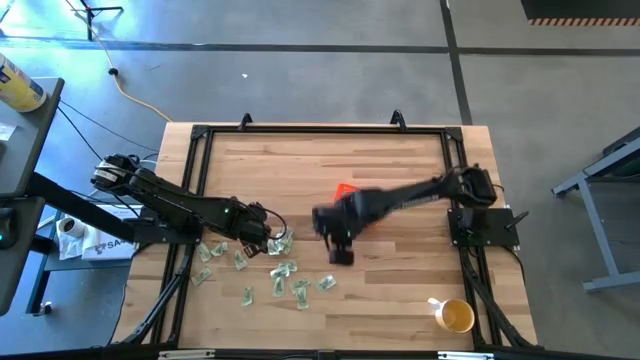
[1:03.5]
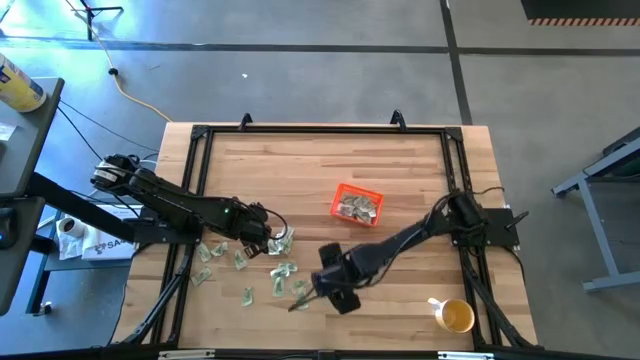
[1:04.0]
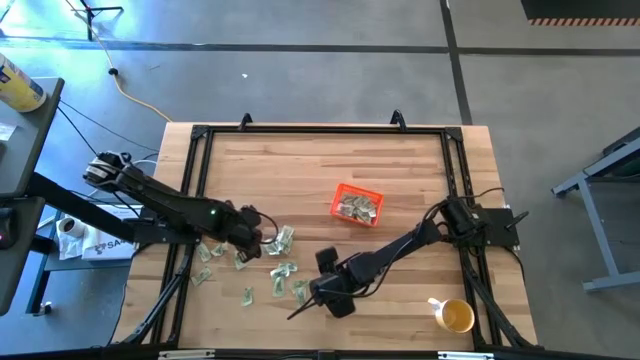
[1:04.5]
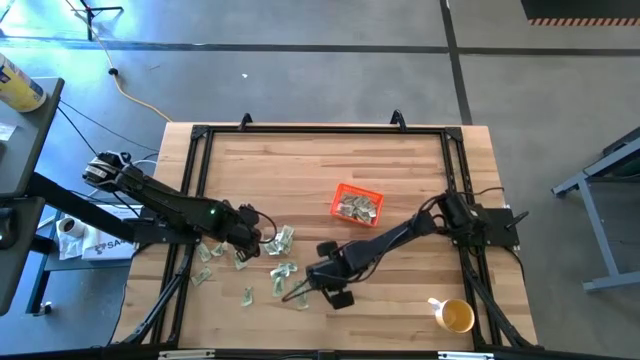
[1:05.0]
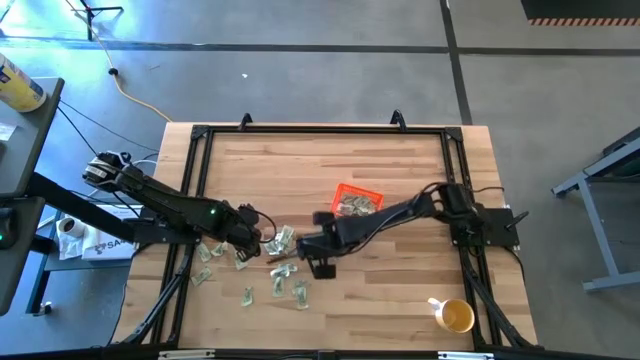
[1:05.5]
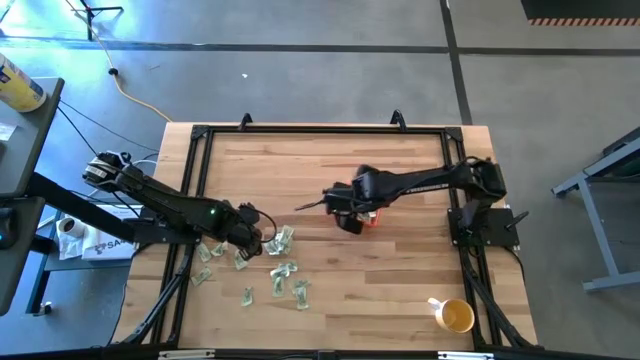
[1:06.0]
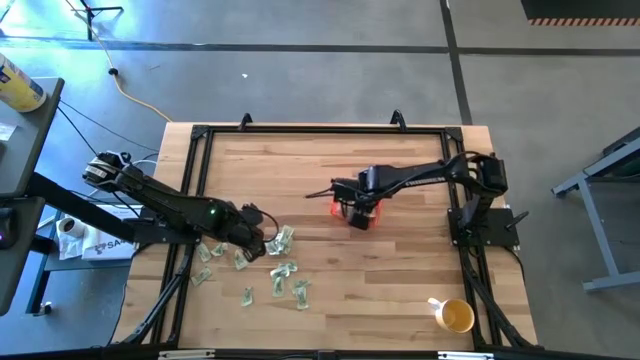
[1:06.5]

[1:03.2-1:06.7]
Task: Pick and place Stevia / Truvia into bins
Put the green stevia packet into the orange basket

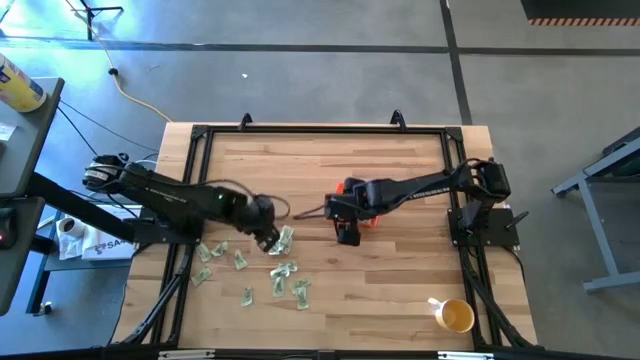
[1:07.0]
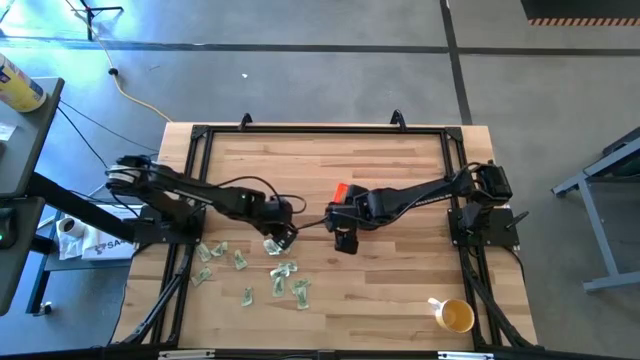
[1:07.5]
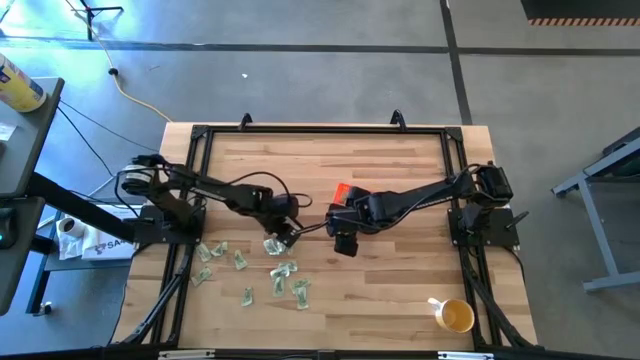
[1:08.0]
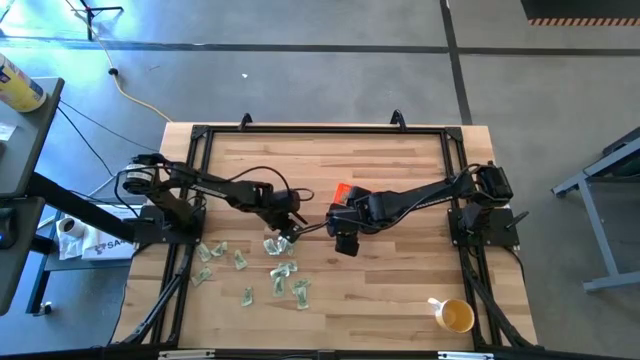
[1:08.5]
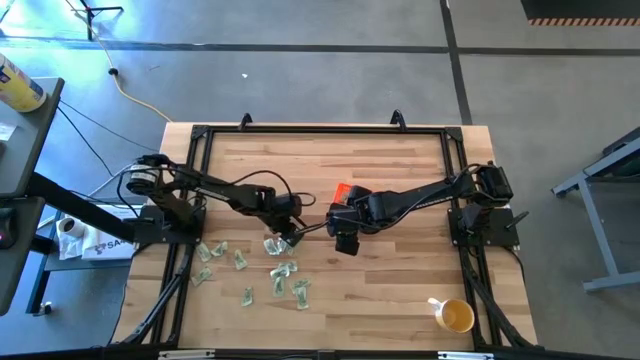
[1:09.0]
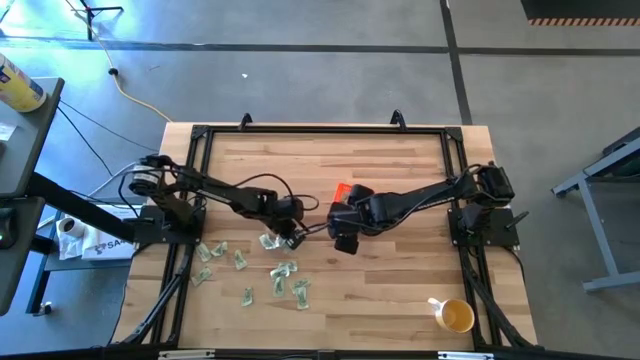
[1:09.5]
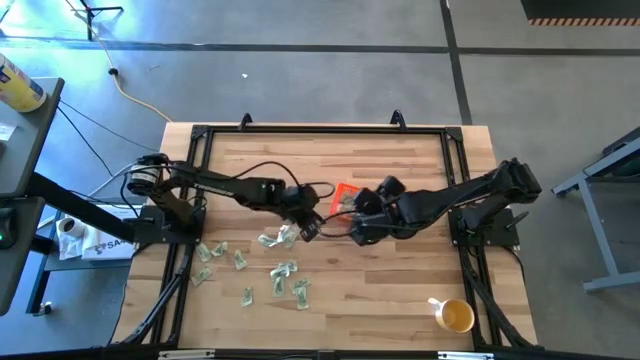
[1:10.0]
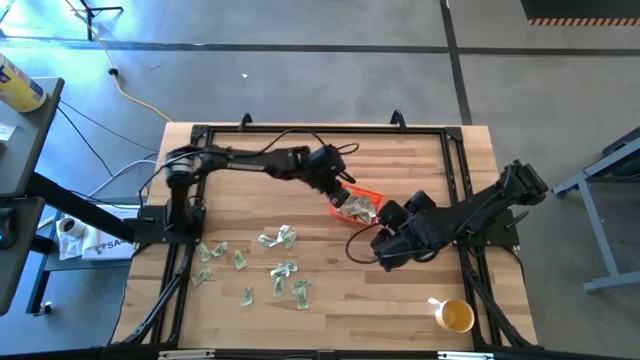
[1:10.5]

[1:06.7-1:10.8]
Put the green stevia packet into the orange basket

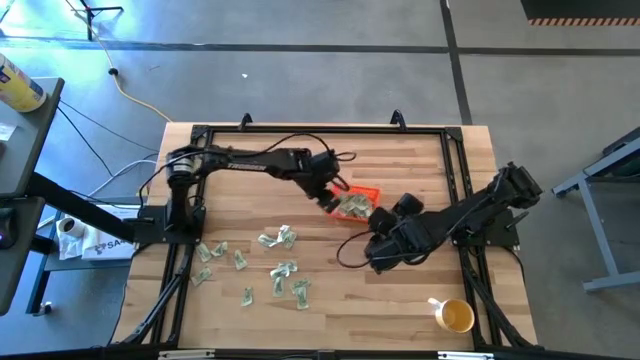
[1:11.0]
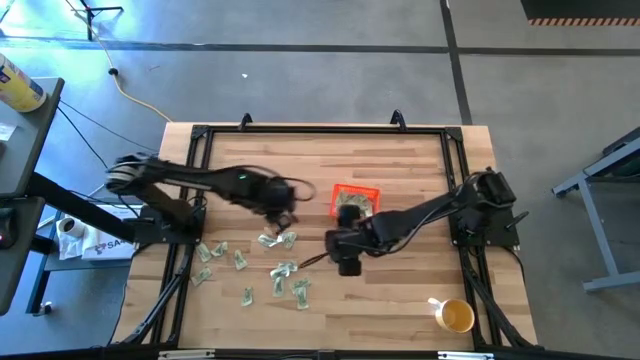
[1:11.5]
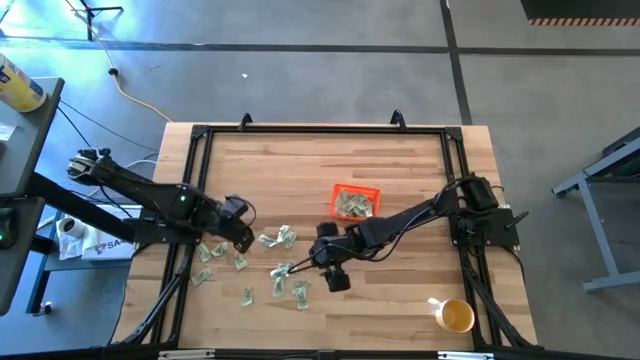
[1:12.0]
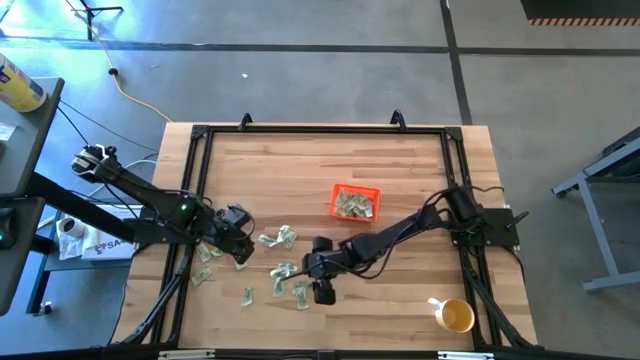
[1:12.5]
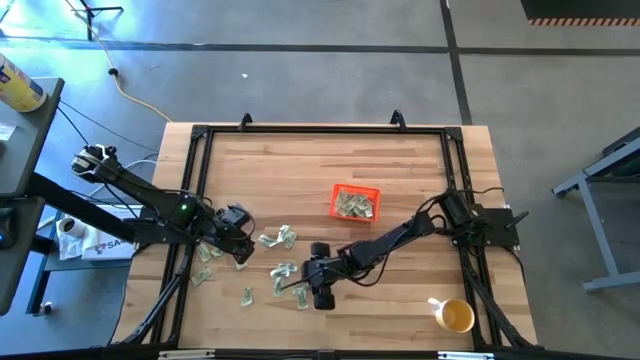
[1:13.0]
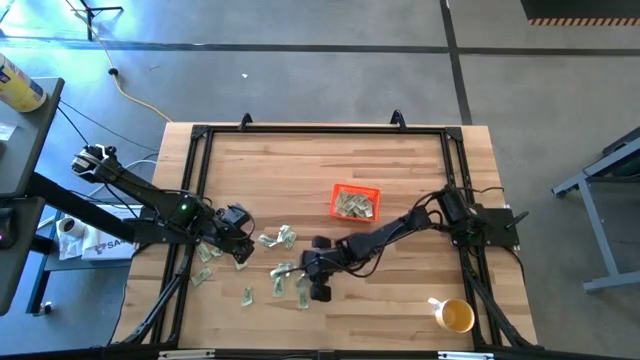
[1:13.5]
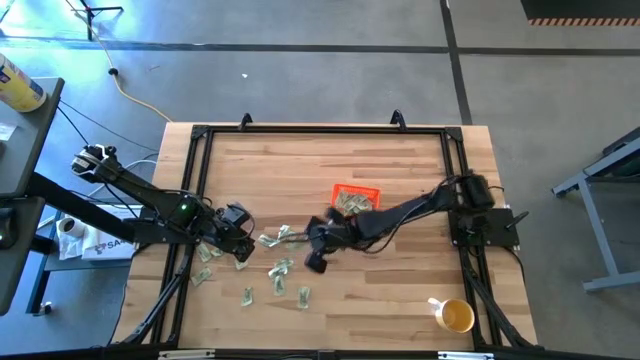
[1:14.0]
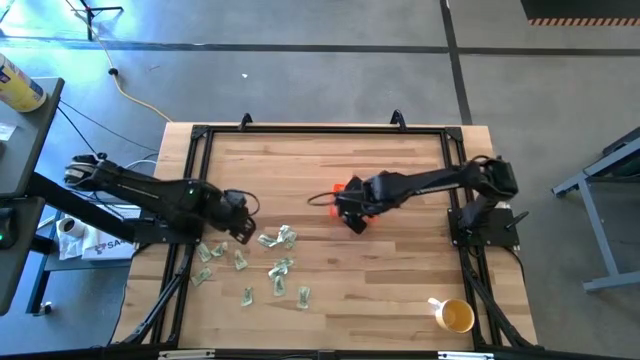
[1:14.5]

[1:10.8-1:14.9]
Put the green stevia packet into the orange basket

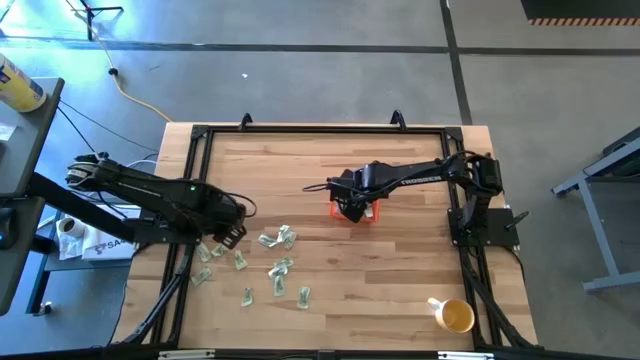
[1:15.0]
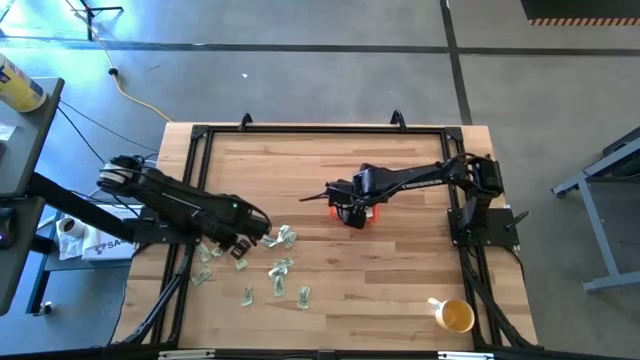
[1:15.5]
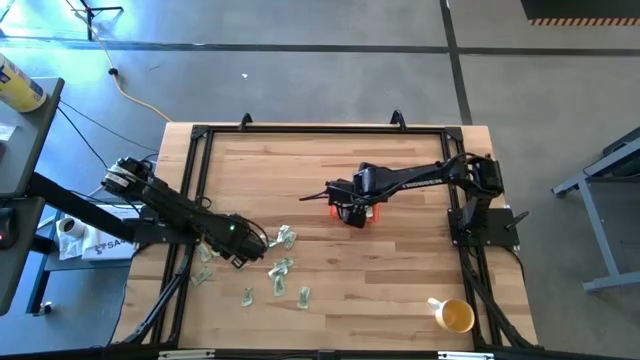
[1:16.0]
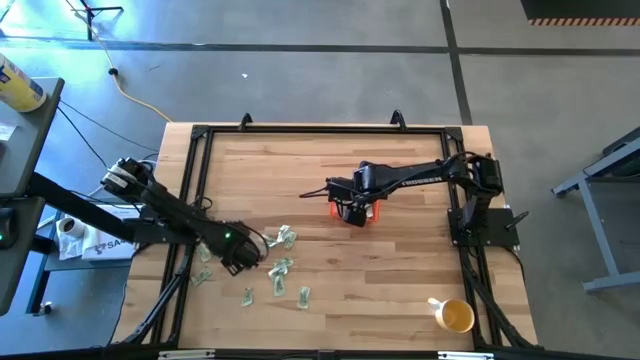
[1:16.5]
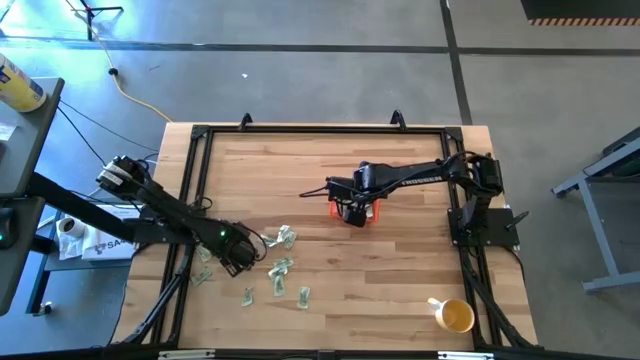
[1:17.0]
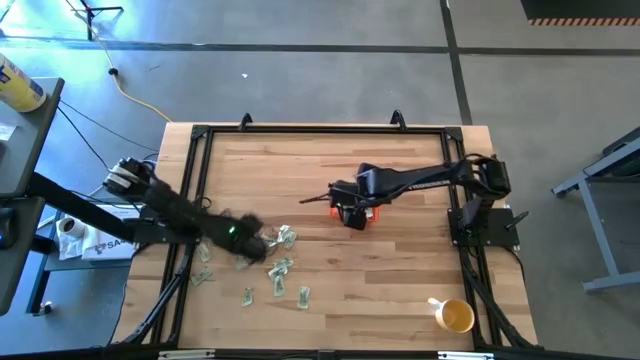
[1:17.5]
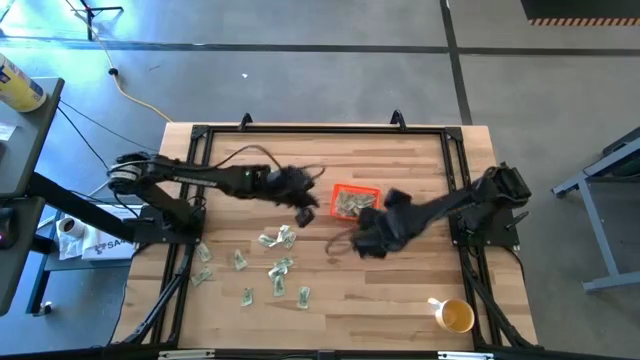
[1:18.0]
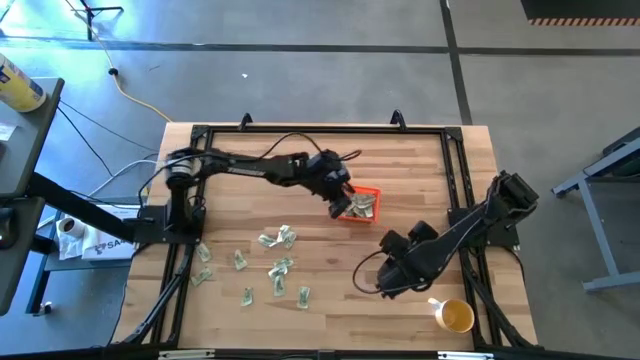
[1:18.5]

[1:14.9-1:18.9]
Put the green stevia packet into the orange basket

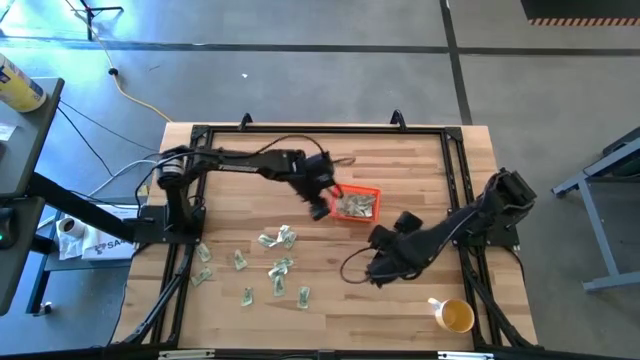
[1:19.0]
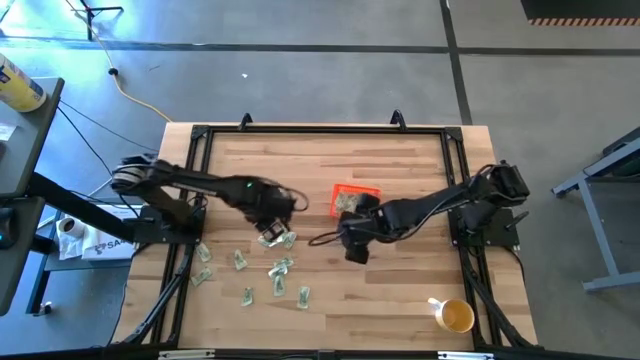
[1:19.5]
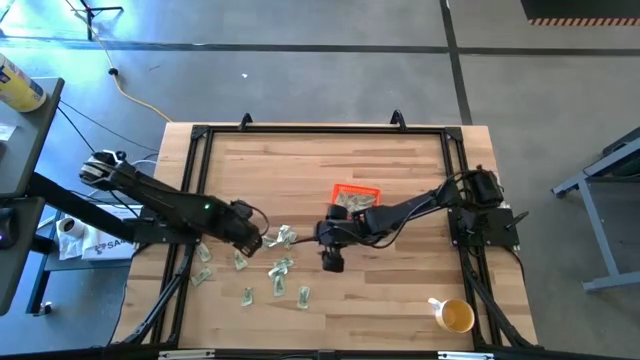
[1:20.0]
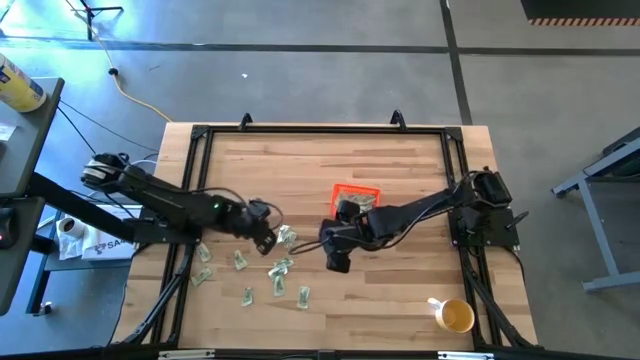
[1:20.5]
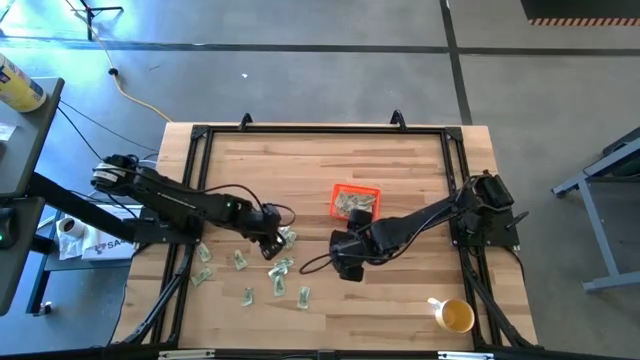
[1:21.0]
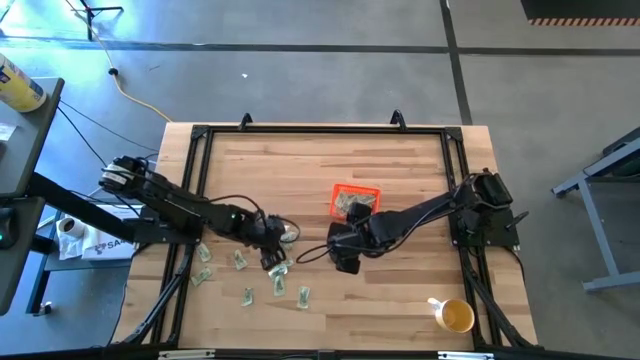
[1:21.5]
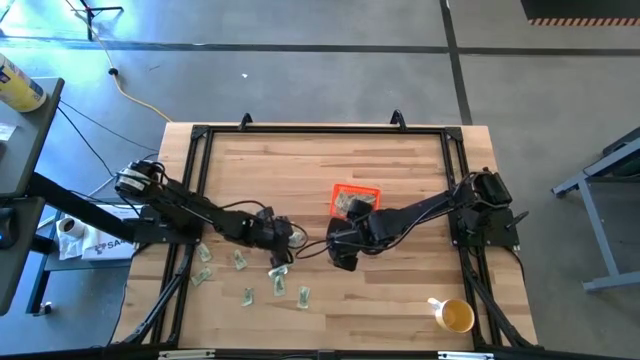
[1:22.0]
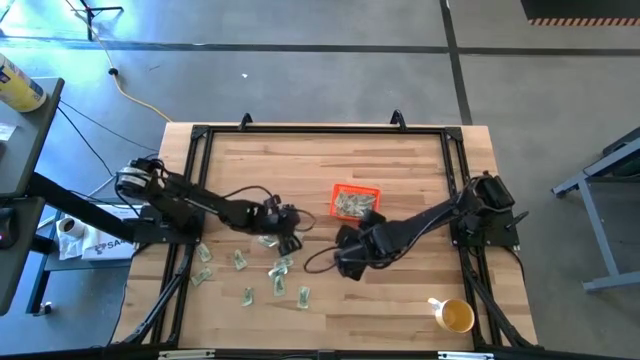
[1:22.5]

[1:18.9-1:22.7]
Put the green stevia packet into the orange basket

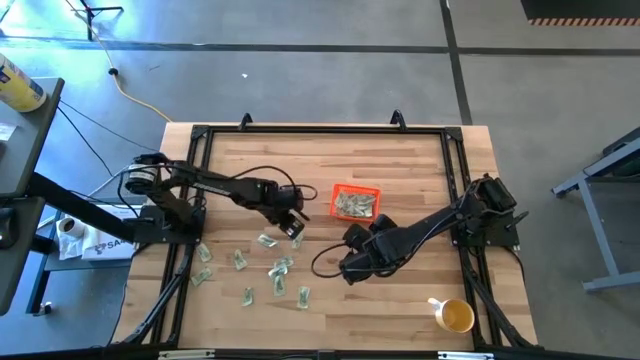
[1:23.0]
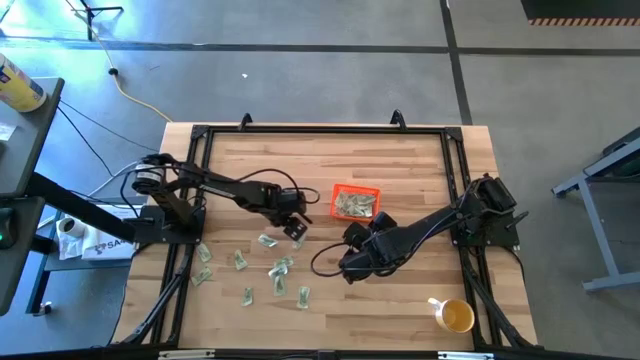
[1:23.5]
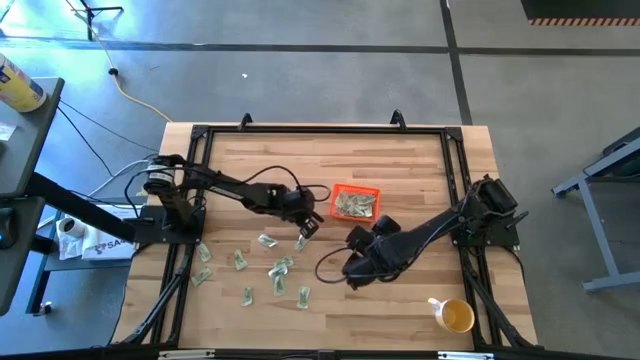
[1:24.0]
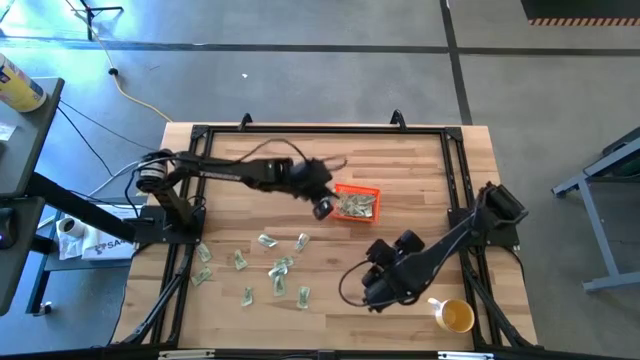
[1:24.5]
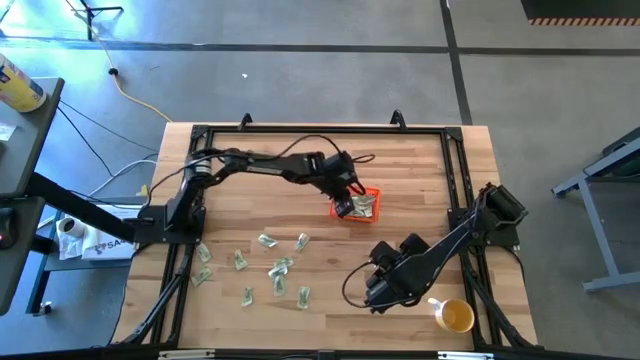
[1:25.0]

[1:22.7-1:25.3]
Put the green stevia packet into the orange basket
